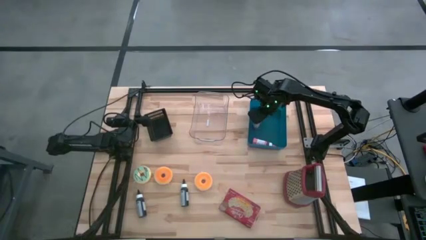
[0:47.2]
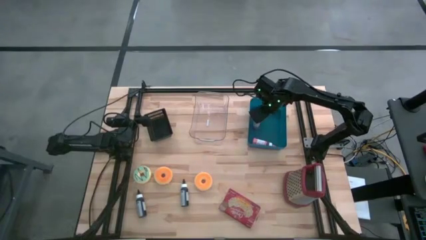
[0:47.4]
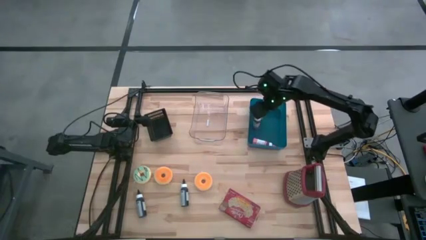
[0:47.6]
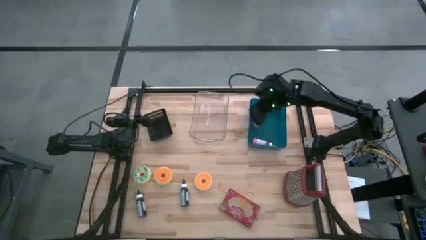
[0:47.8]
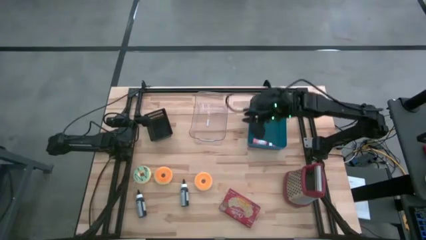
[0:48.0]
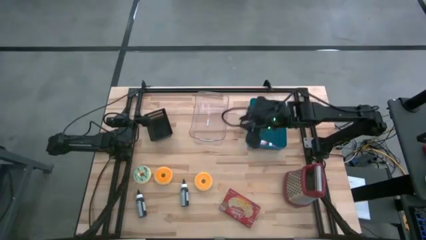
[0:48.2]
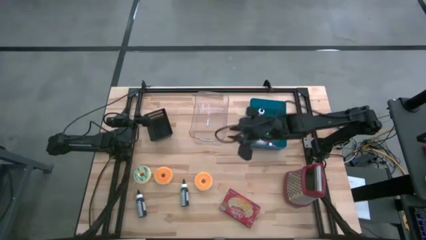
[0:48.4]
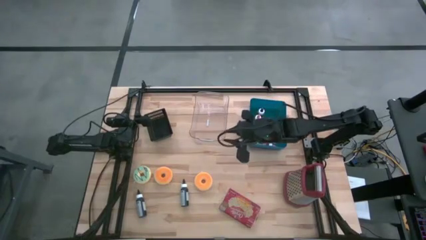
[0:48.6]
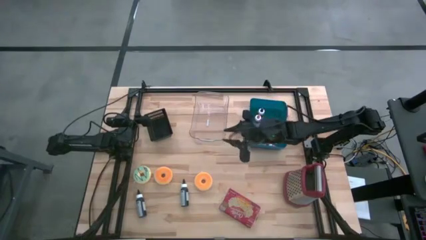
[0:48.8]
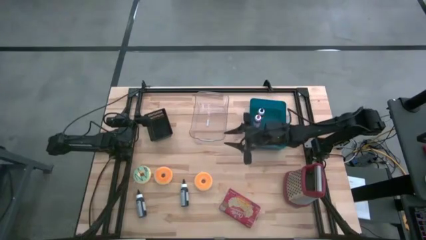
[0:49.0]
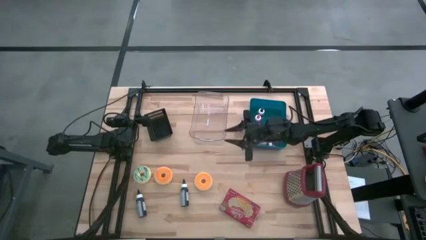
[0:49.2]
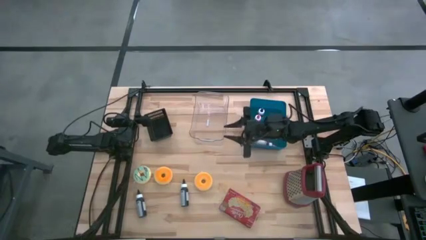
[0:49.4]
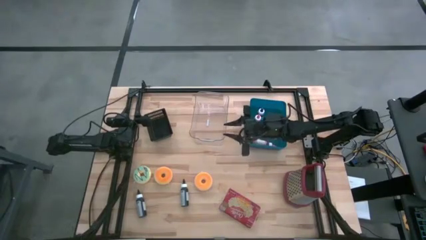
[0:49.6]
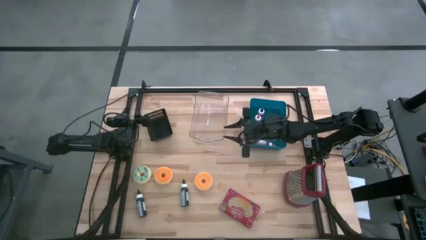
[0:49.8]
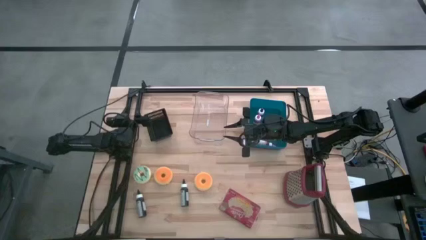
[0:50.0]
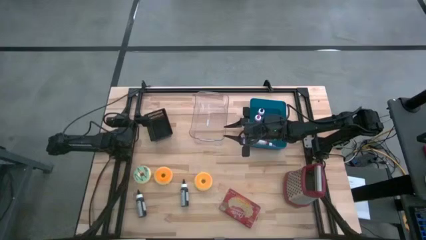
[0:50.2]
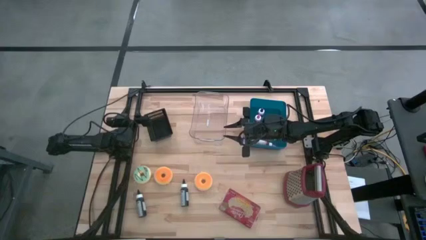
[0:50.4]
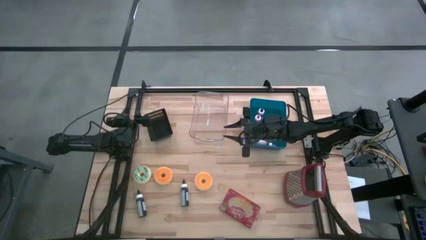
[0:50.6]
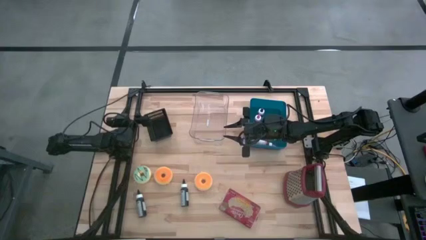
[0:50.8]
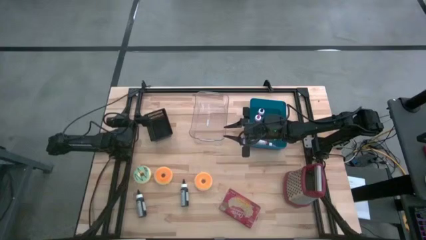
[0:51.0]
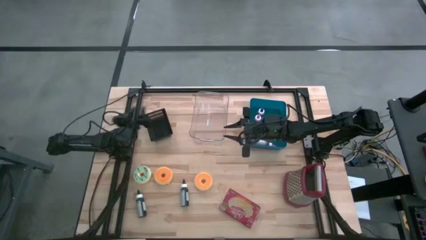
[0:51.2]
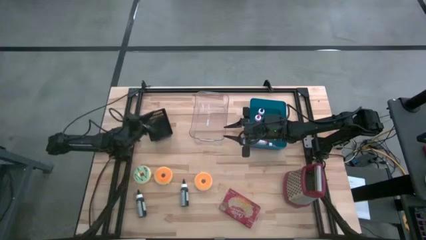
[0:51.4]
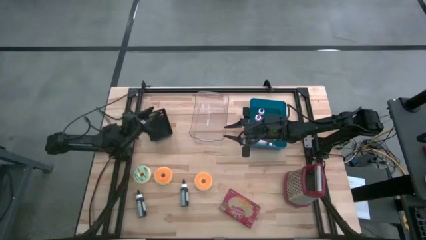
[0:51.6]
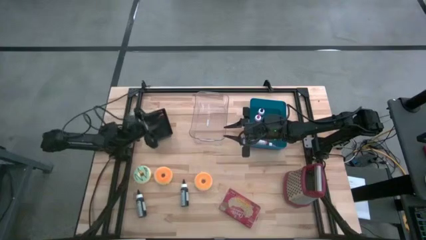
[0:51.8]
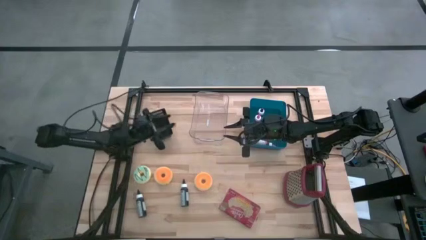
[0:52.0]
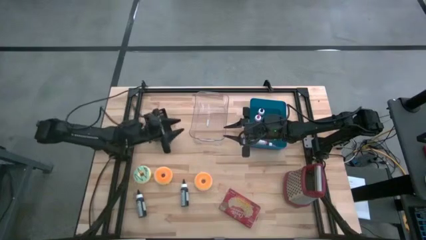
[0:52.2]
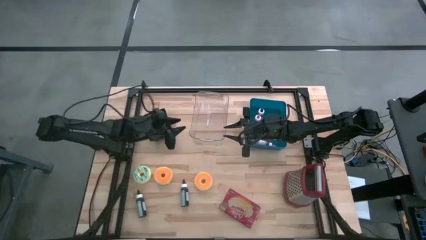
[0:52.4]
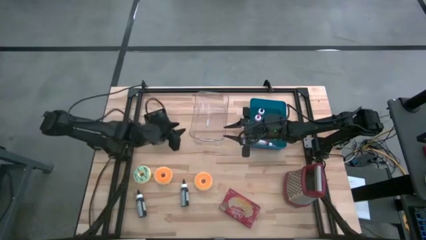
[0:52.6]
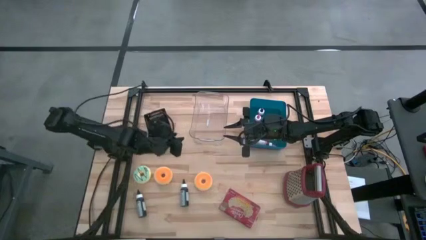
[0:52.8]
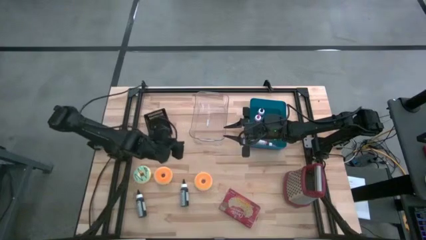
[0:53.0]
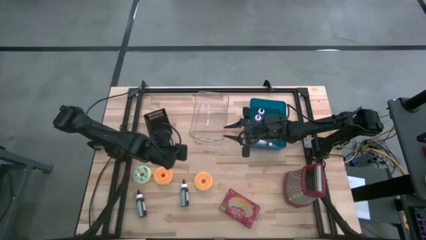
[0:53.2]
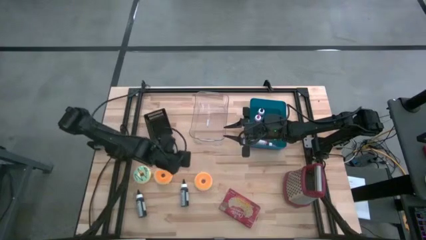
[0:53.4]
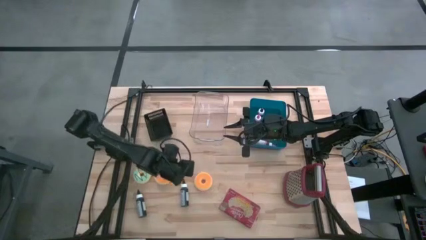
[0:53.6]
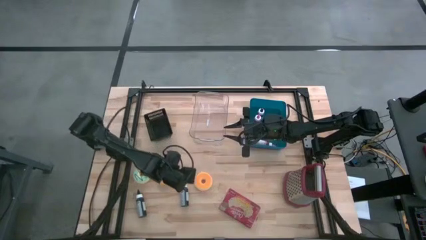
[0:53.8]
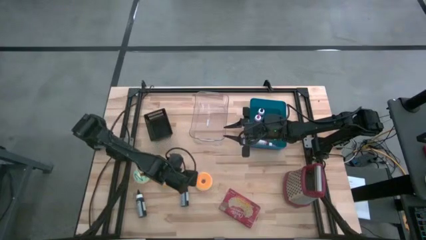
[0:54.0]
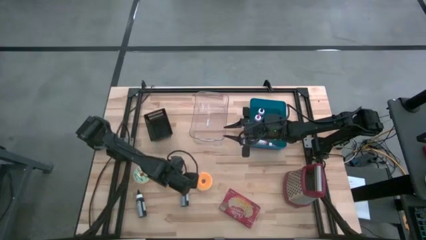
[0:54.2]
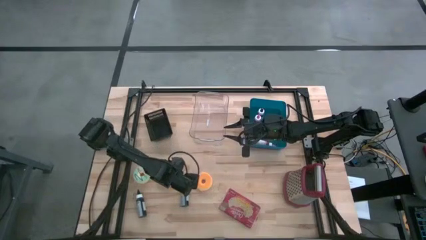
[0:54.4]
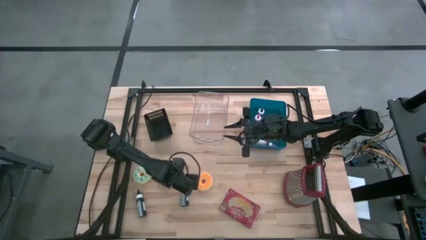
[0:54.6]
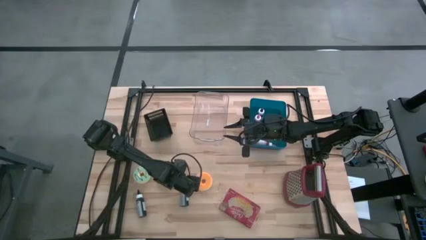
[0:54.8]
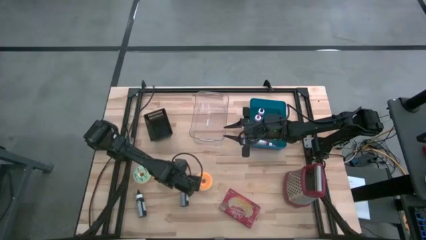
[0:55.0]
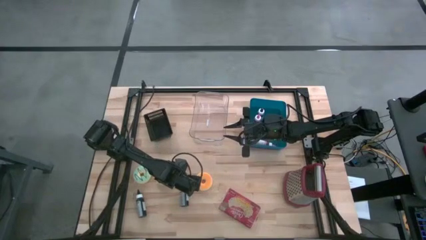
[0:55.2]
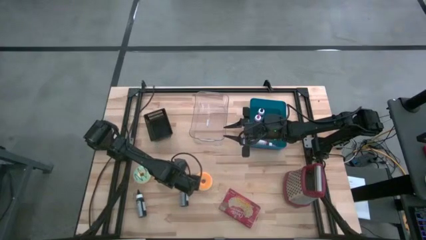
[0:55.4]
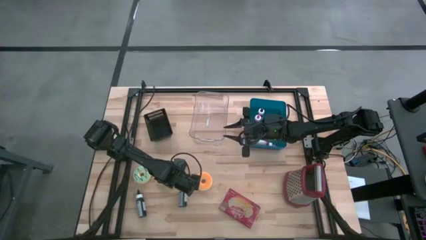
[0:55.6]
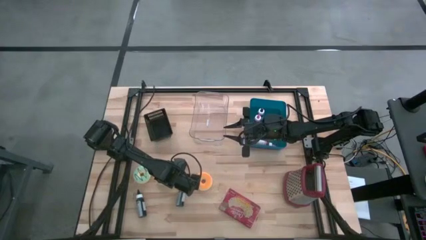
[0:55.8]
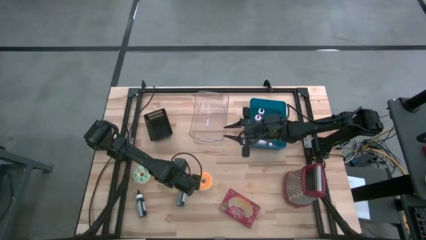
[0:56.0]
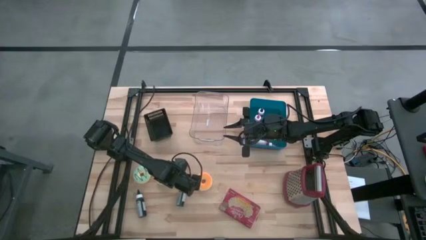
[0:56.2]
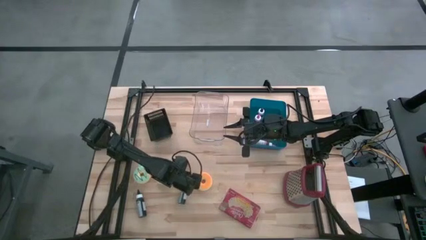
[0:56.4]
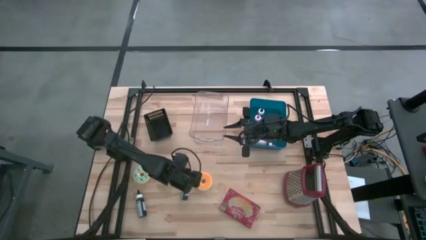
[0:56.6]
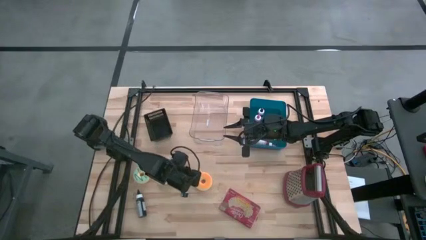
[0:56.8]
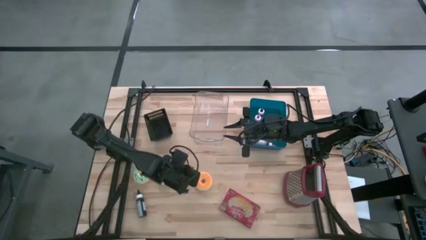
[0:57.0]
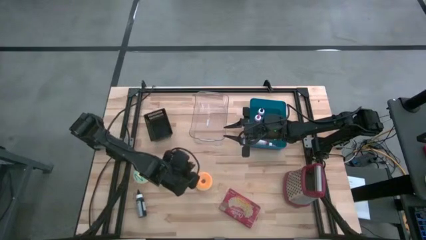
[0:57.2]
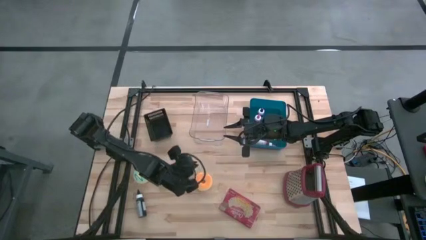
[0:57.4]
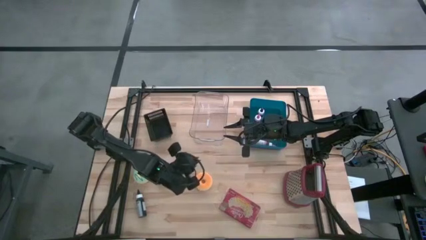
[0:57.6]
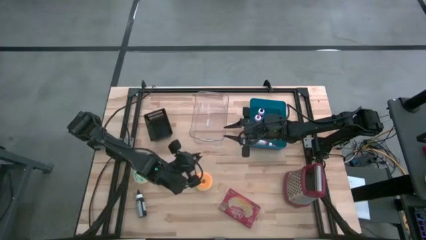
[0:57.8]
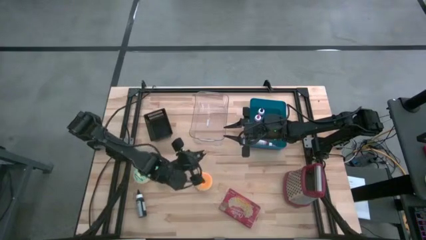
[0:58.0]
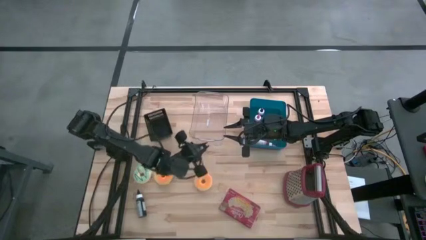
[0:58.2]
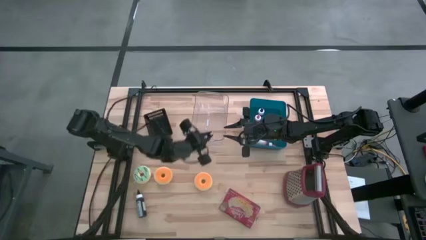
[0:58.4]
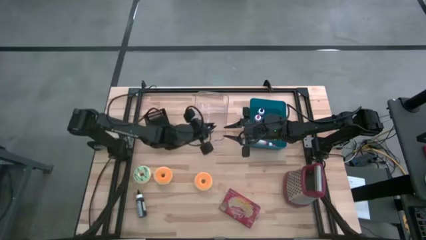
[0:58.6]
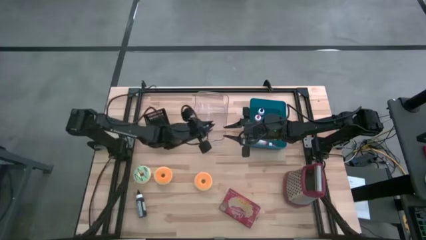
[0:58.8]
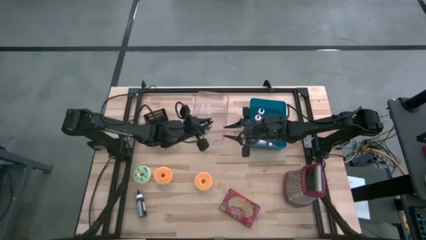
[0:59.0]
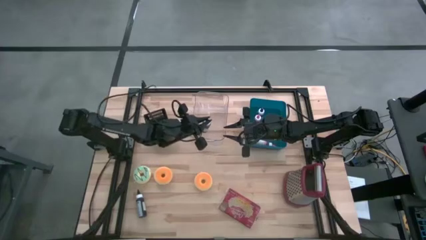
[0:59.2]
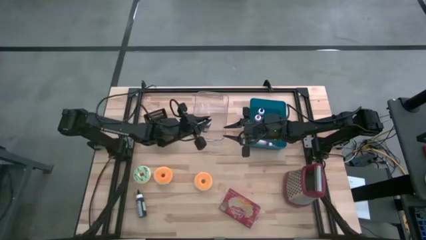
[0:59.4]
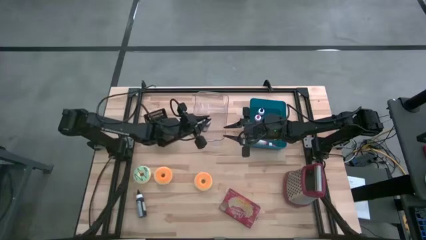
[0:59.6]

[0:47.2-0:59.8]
Task: Pick & Place Food Item
Put the right black food coloring bottle into the blue bin
